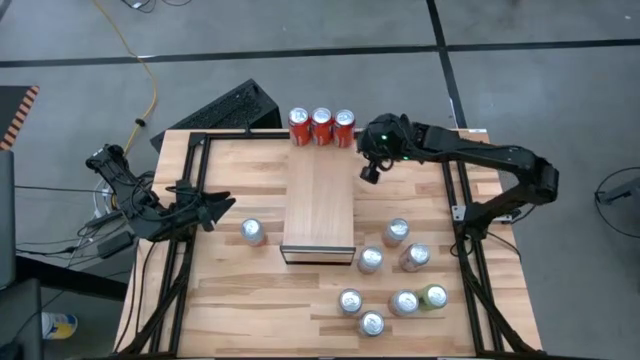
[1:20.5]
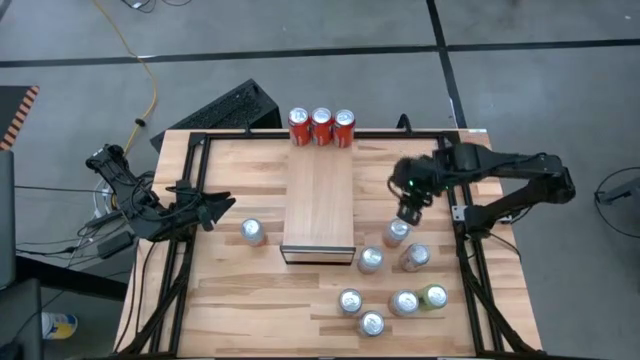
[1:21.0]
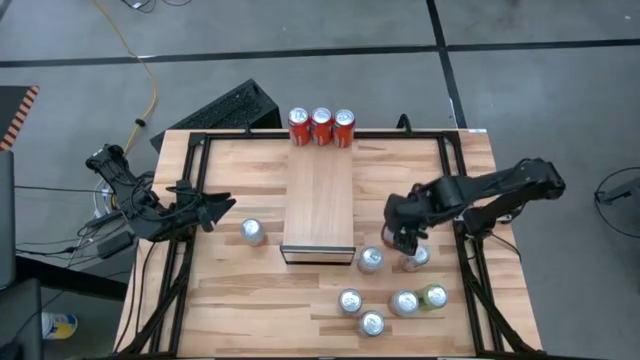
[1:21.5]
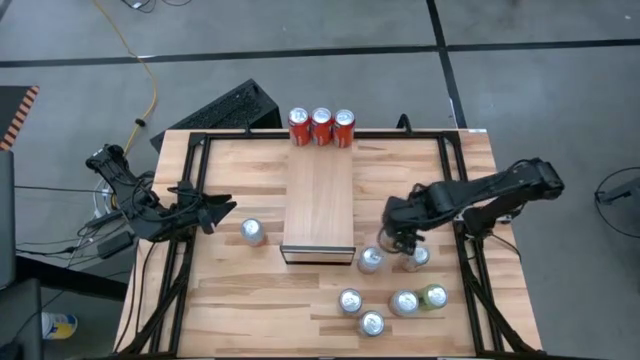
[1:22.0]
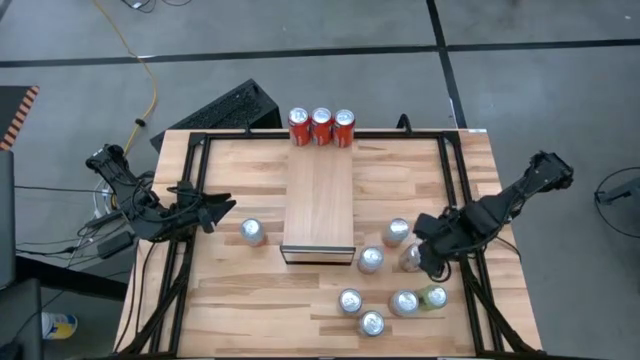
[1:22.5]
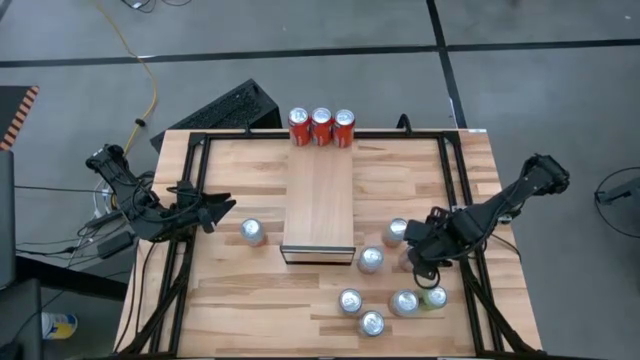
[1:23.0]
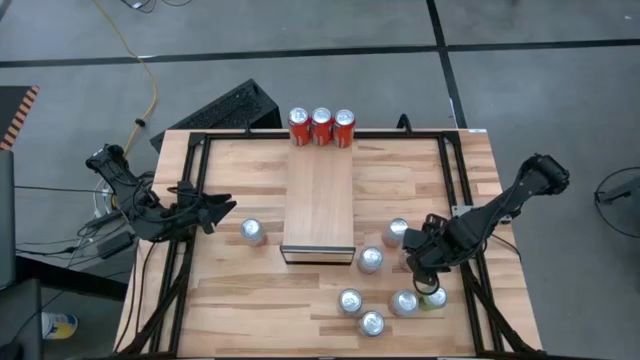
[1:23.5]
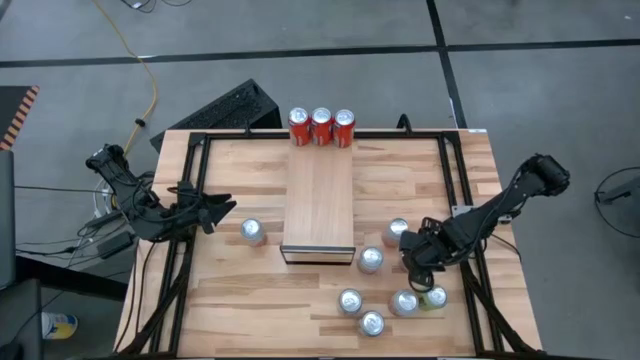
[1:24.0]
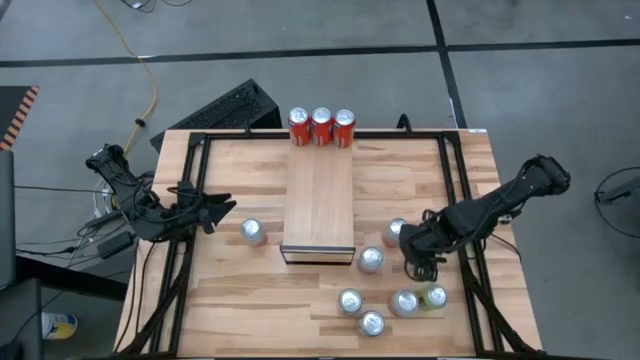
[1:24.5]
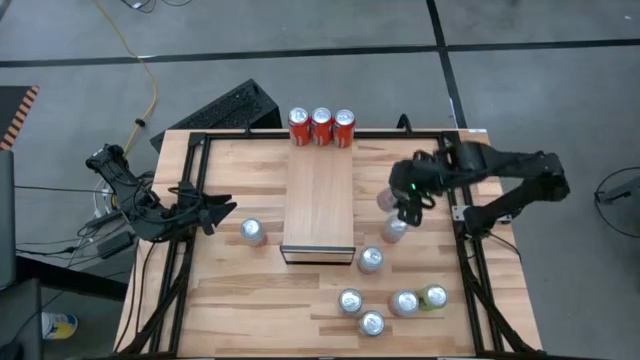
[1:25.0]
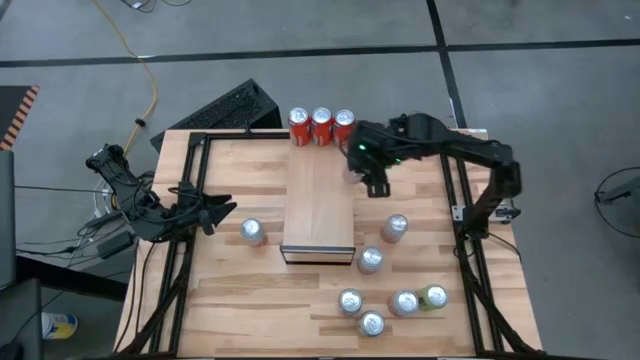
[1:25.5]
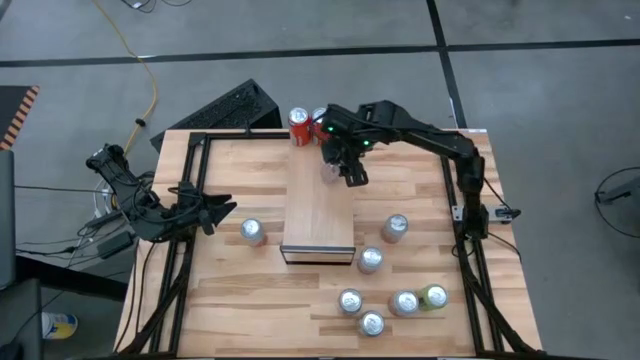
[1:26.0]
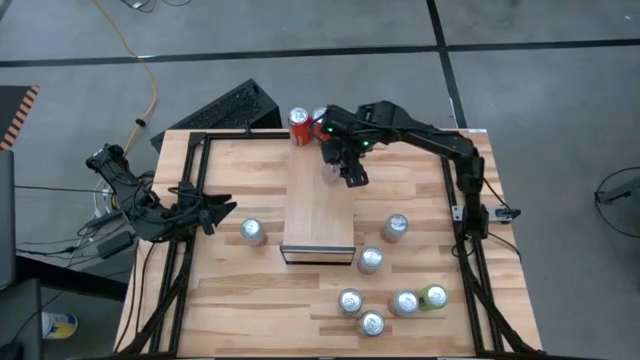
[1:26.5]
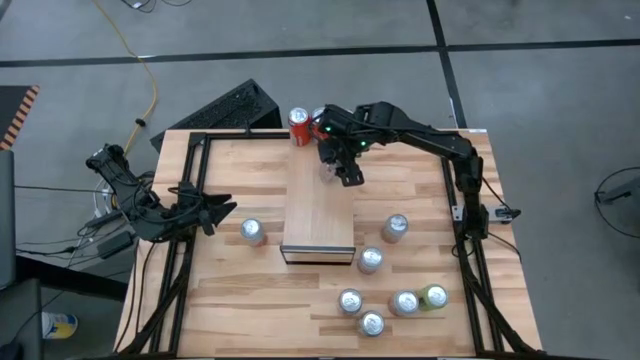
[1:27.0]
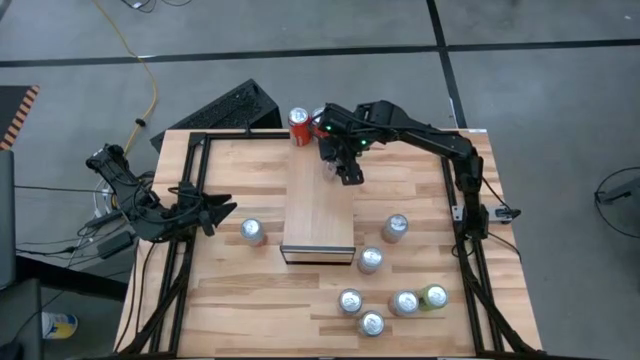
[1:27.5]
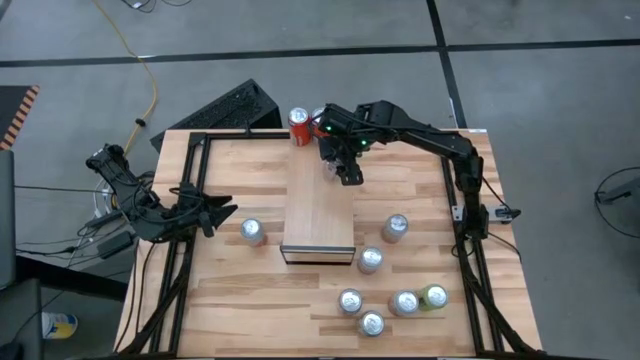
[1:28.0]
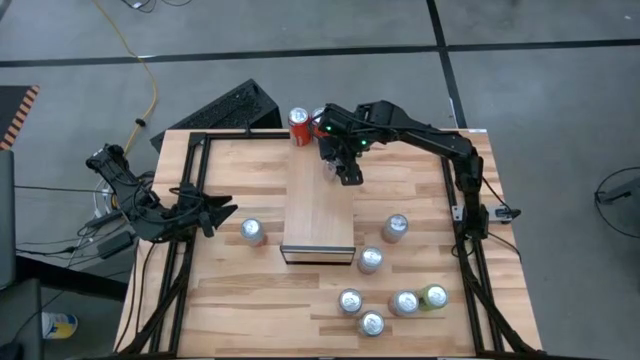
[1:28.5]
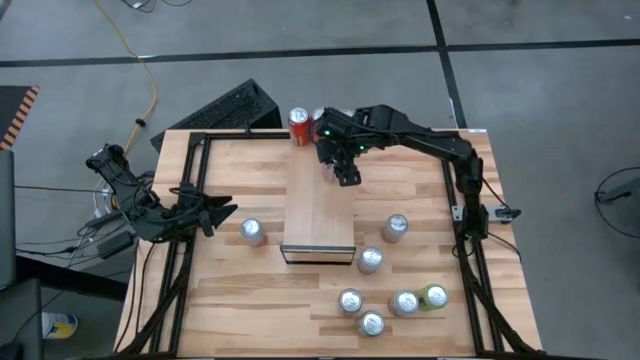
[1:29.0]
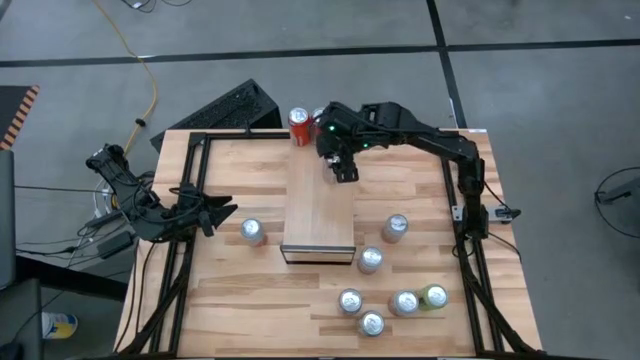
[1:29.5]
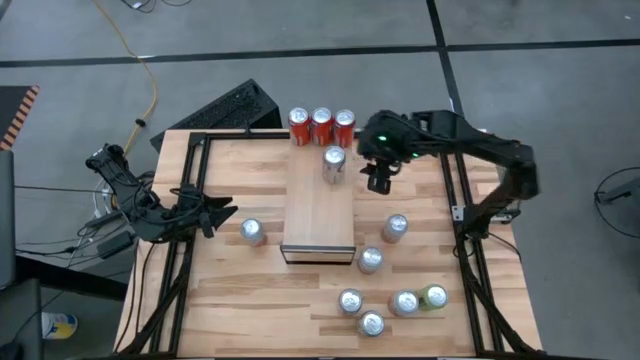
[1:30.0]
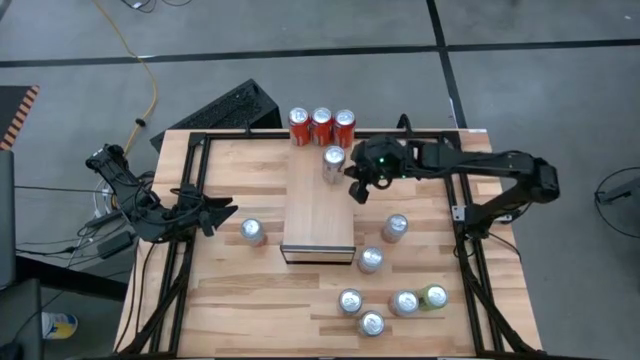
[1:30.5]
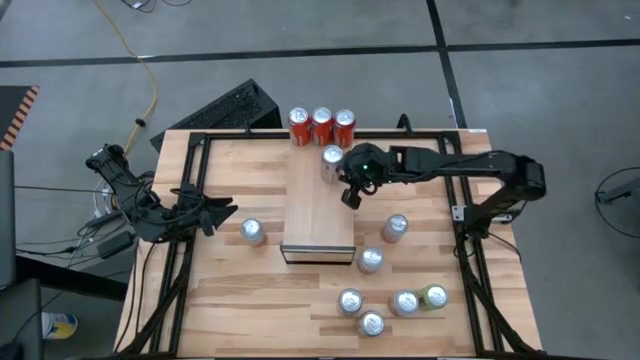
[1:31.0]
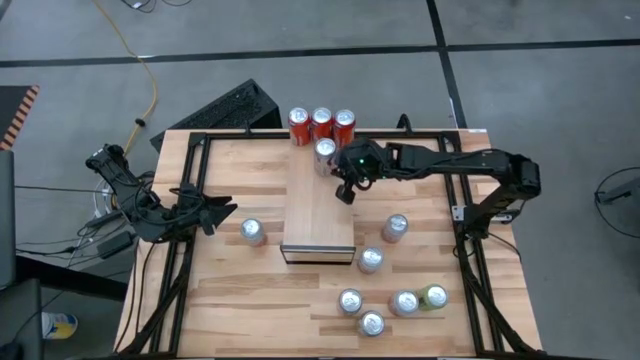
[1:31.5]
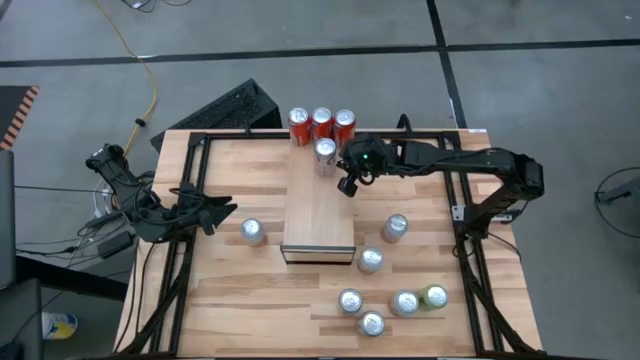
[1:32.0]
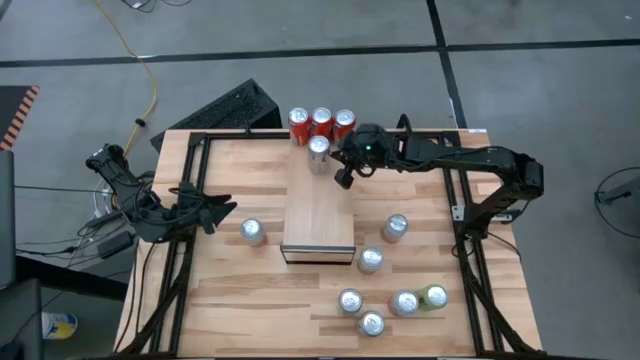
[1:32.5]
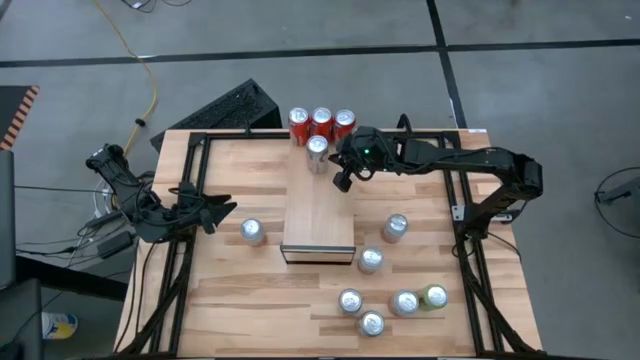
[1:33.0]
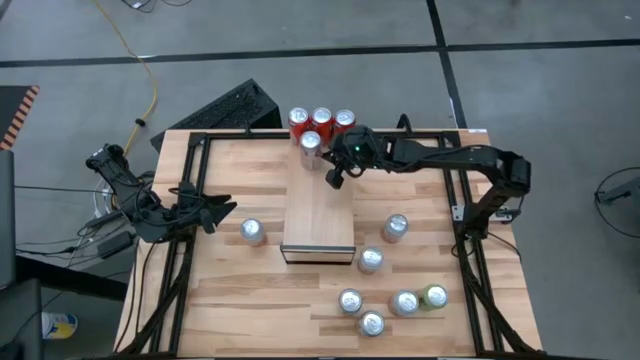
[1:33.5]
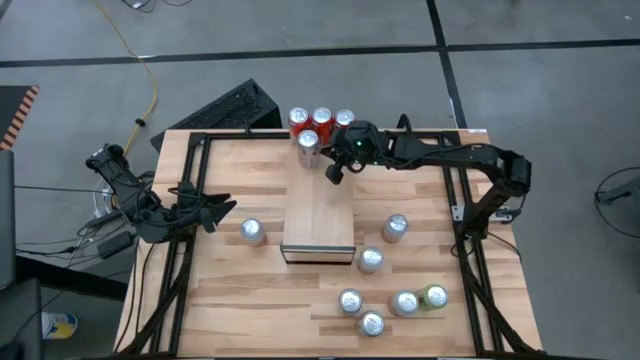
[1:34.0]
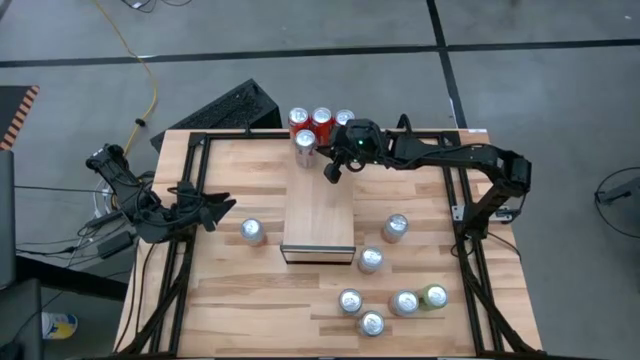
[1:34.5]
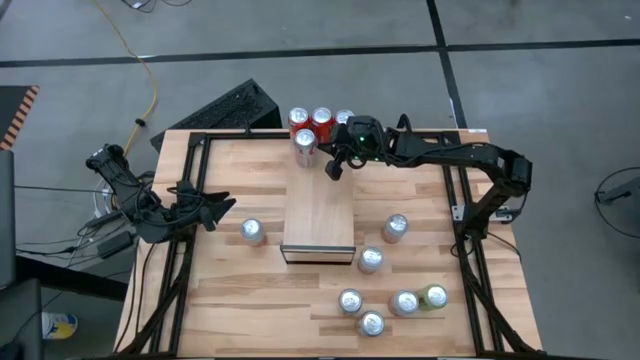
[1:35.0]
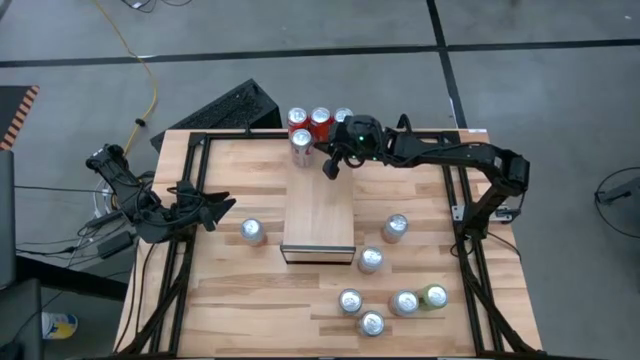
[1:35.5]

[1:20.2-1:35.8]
Task: Place canned beverage on shelf
Put the top red-silver soda can on the shelf

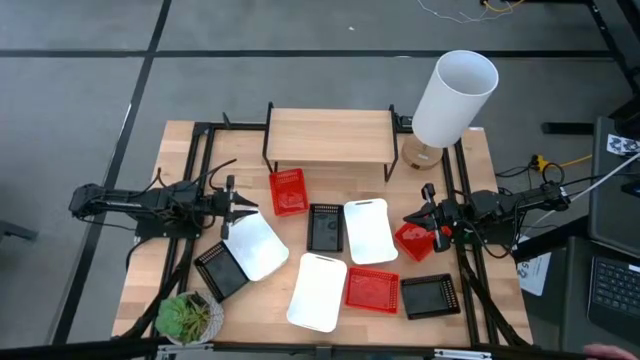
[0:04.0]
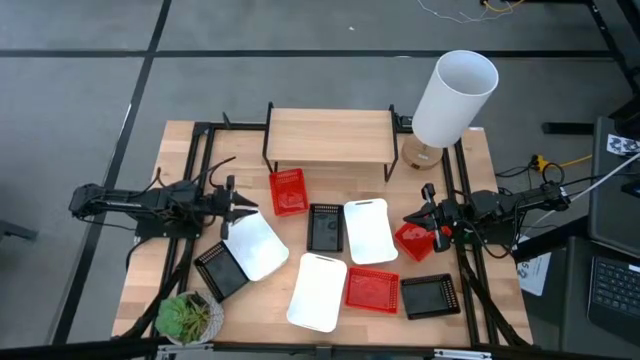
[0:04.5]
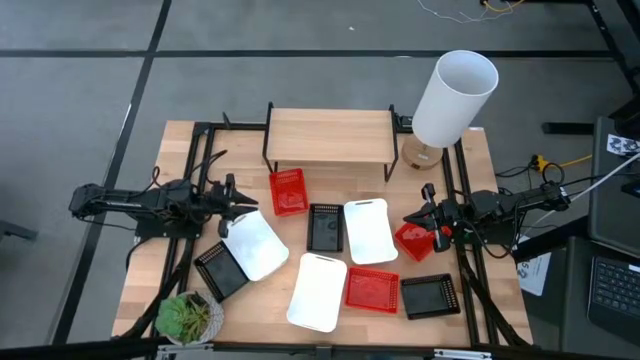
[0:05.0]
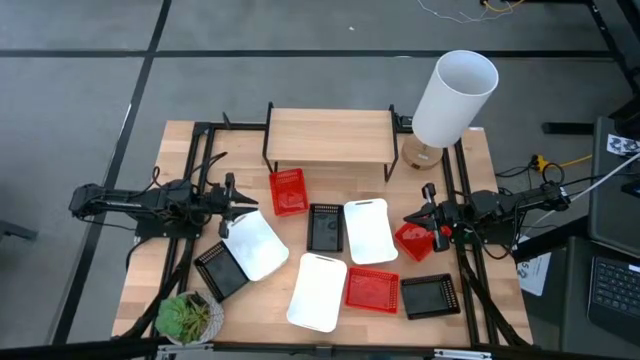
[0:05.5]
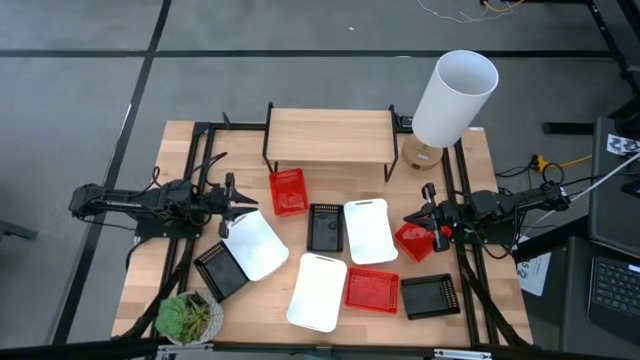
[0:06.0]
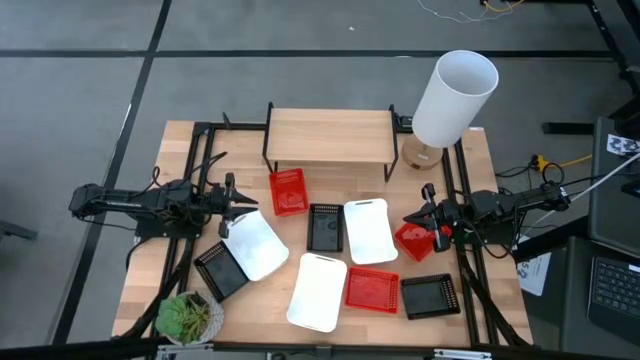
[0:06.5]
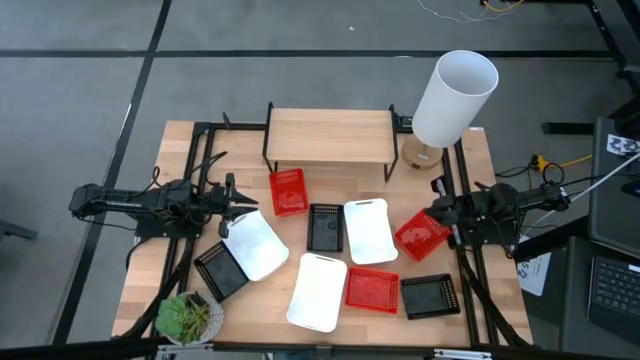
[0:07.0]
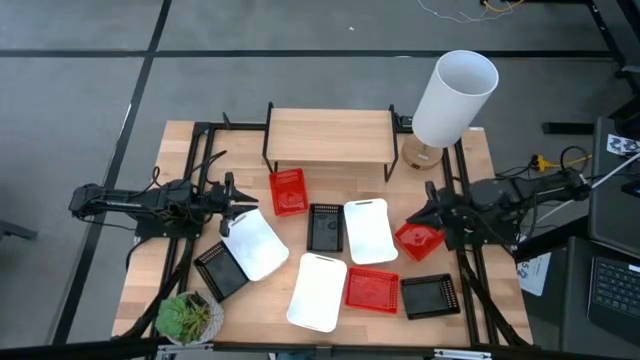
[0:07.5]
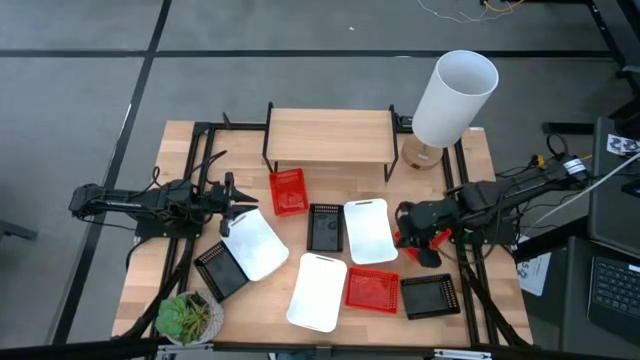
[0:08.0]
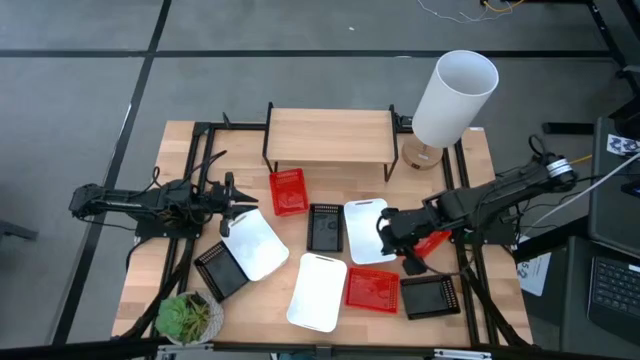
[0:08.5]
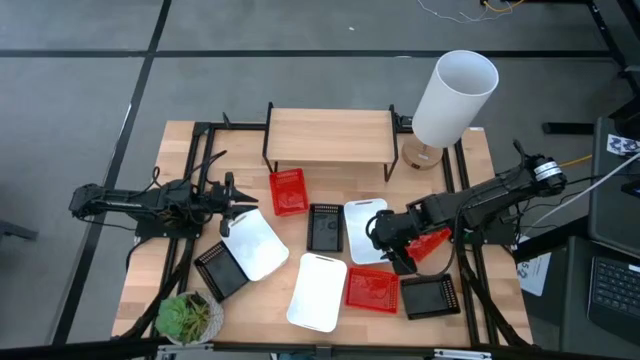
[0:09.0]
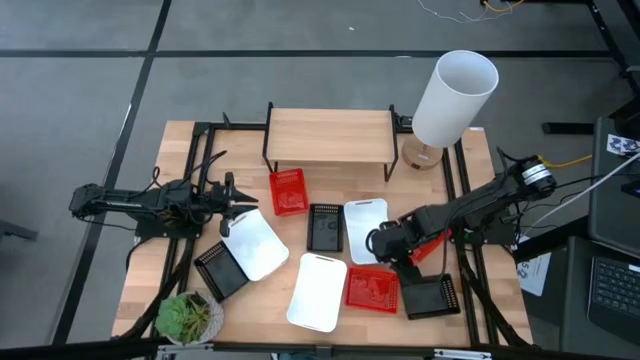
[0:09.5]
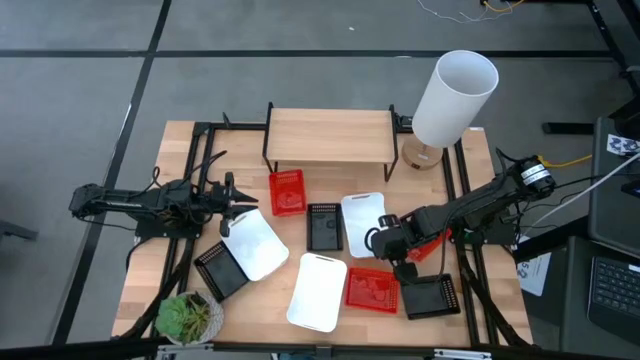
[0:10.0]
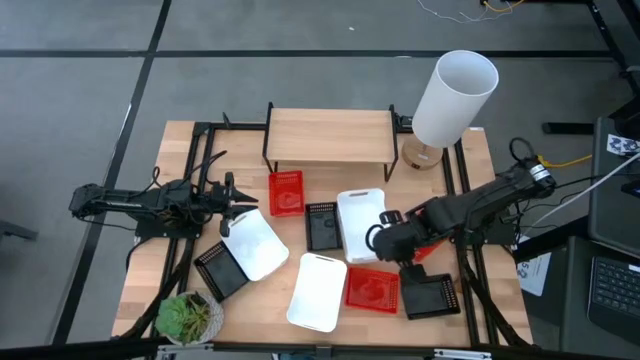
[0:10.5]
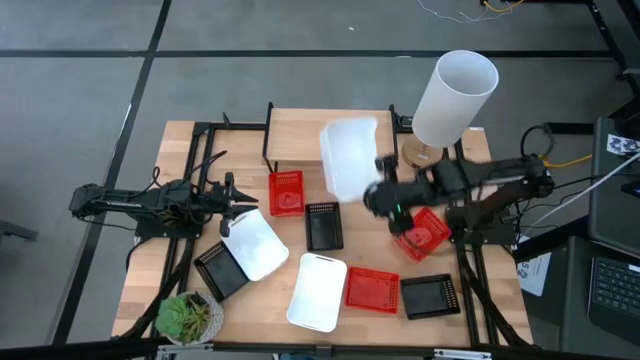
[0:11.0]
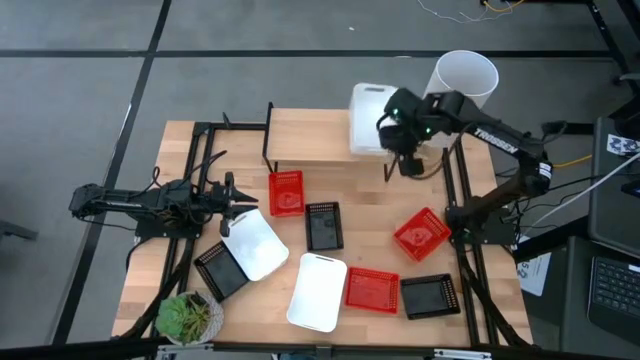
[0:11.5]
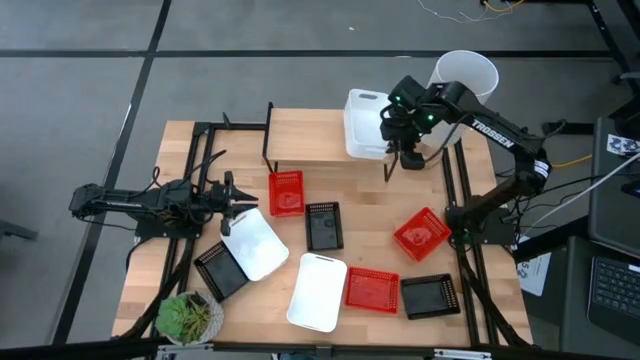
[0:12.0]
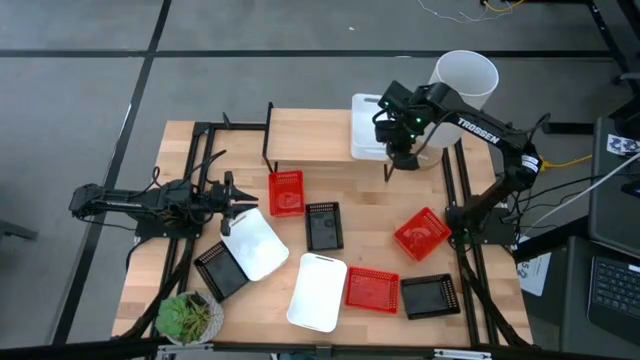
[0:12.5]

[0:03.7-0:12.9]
Task: Stack baskets on shelf by color
Put the top right white bin on the shelf
